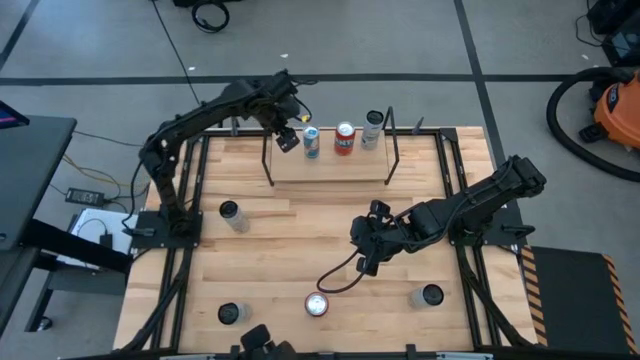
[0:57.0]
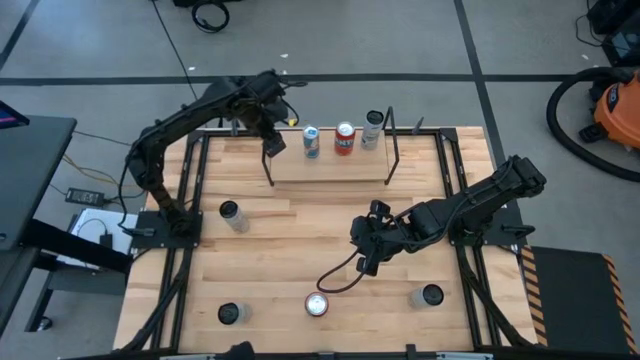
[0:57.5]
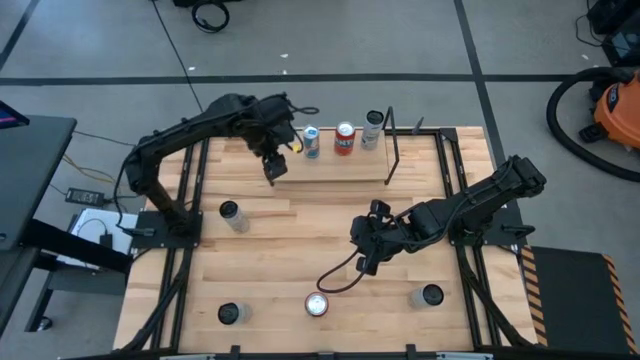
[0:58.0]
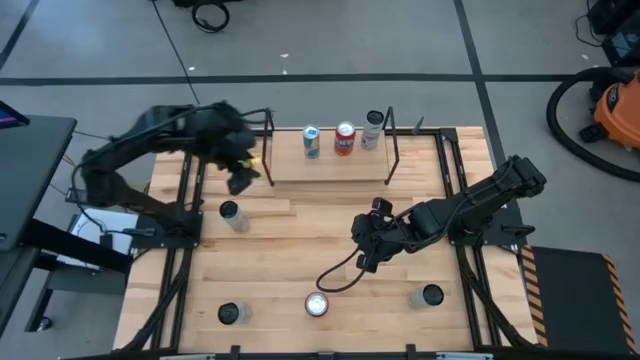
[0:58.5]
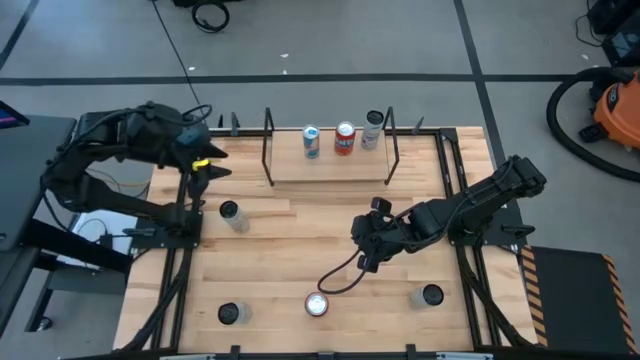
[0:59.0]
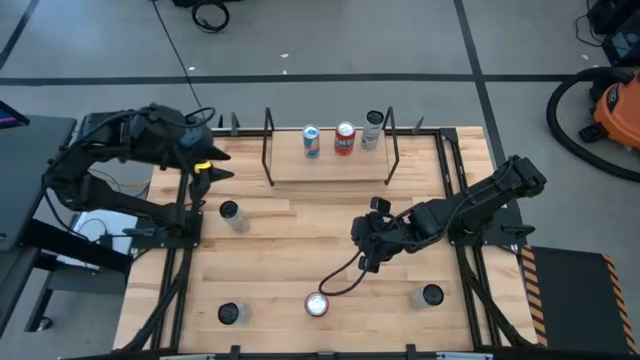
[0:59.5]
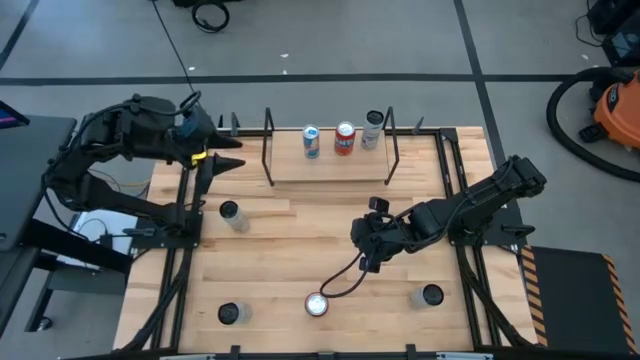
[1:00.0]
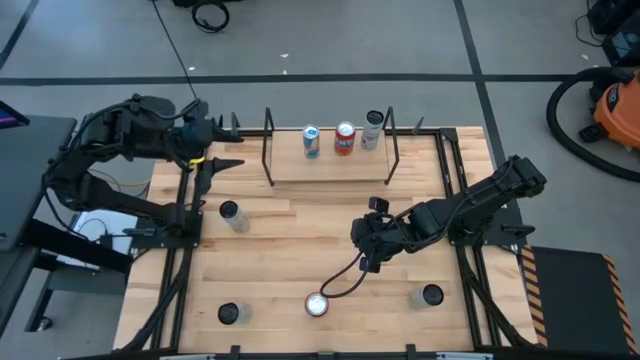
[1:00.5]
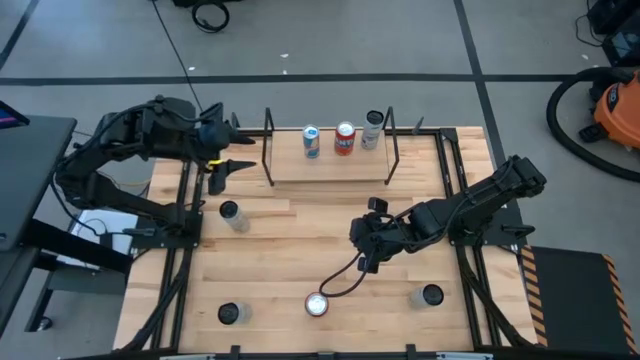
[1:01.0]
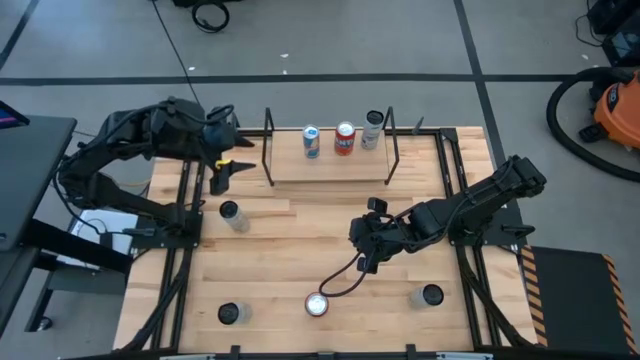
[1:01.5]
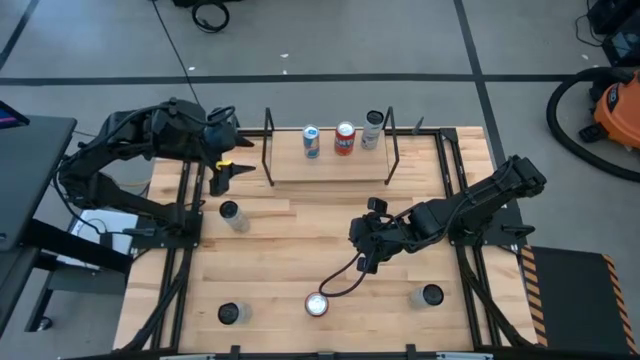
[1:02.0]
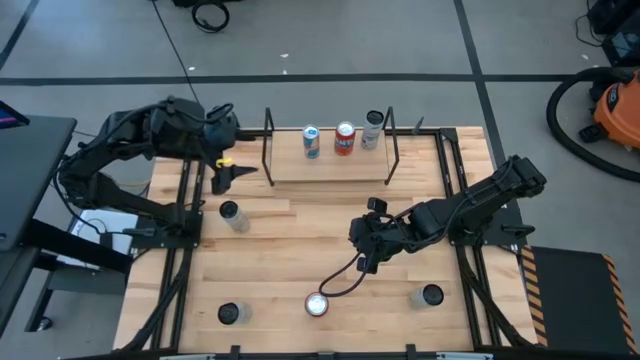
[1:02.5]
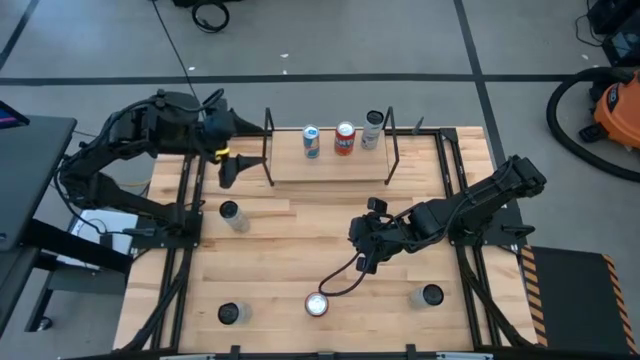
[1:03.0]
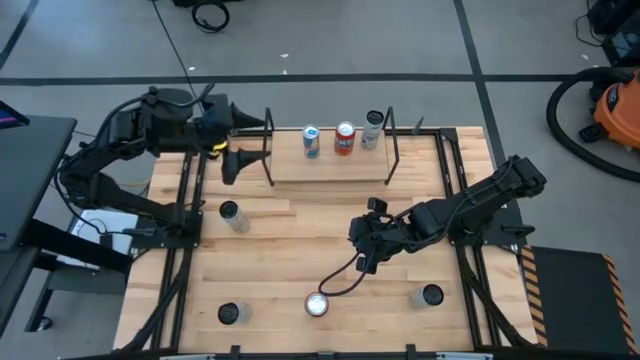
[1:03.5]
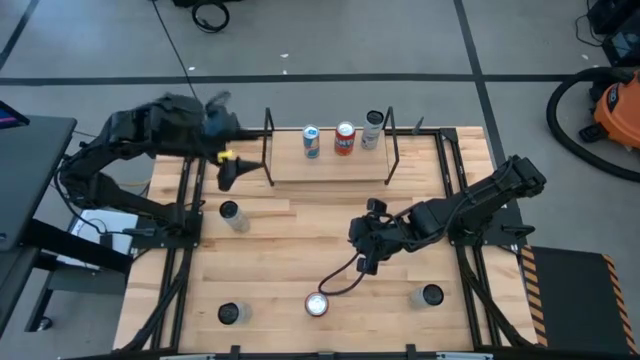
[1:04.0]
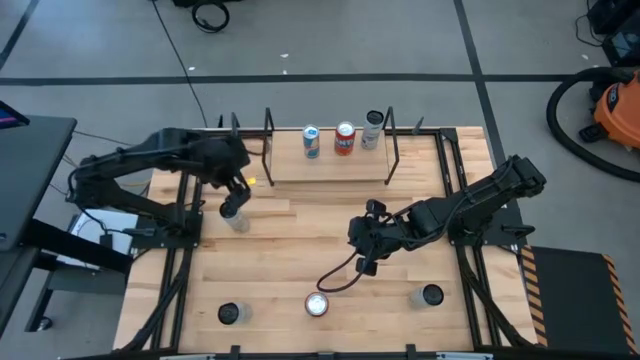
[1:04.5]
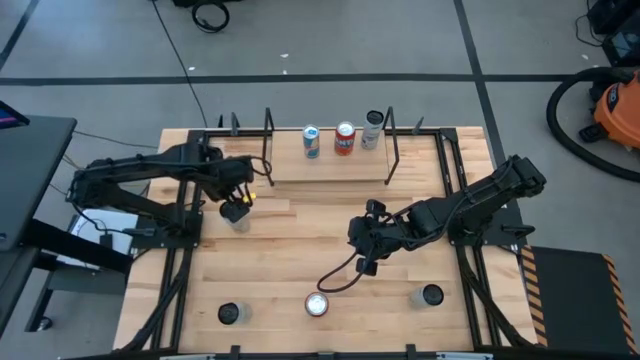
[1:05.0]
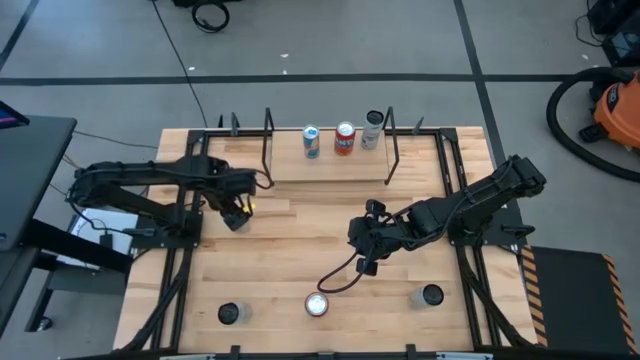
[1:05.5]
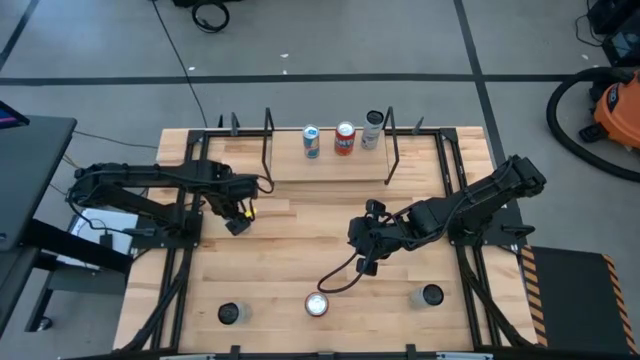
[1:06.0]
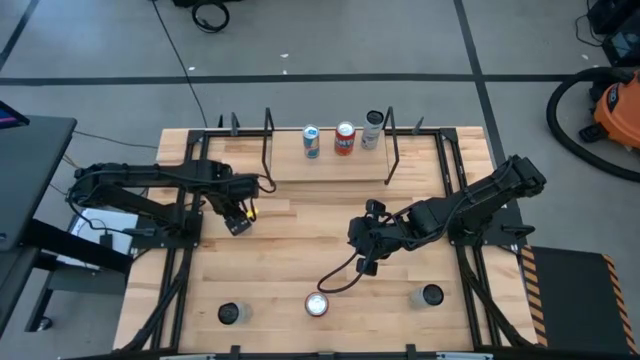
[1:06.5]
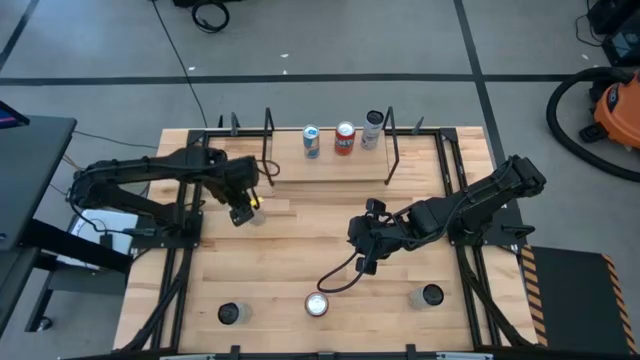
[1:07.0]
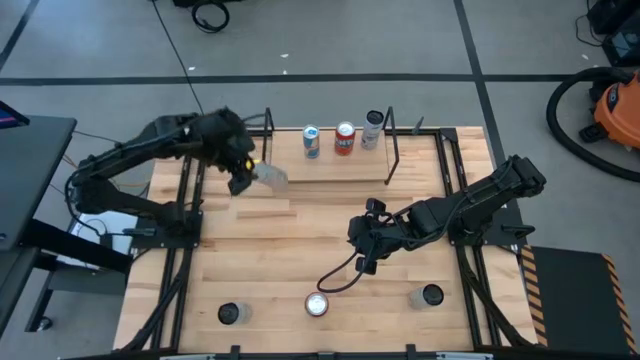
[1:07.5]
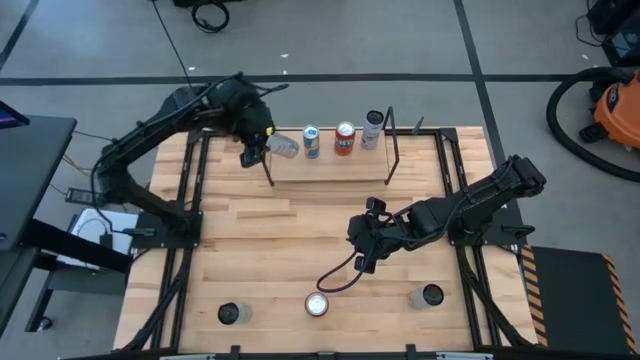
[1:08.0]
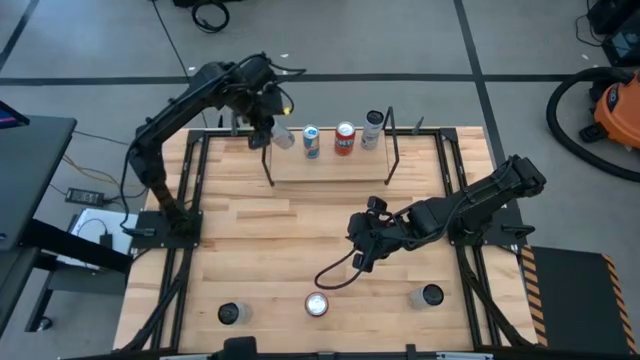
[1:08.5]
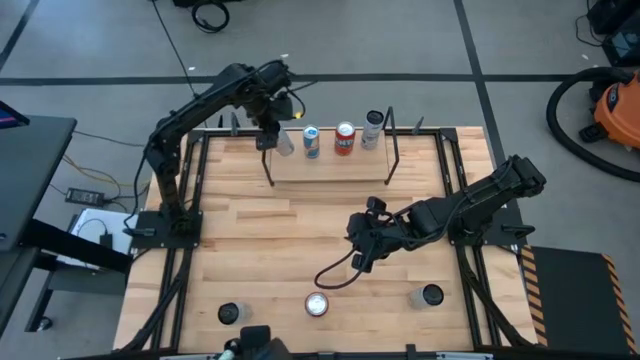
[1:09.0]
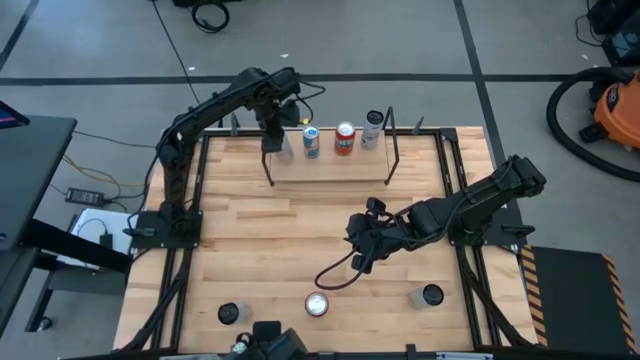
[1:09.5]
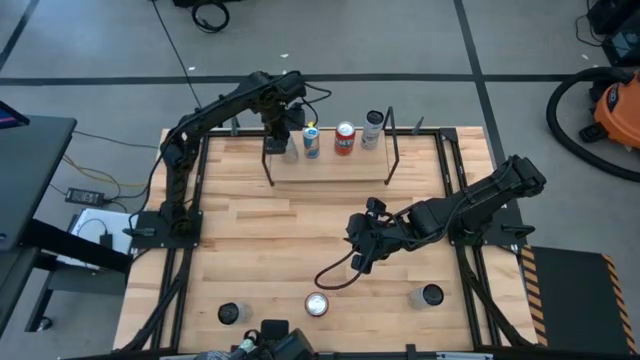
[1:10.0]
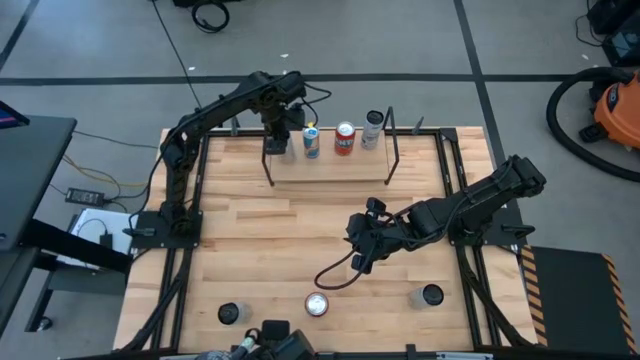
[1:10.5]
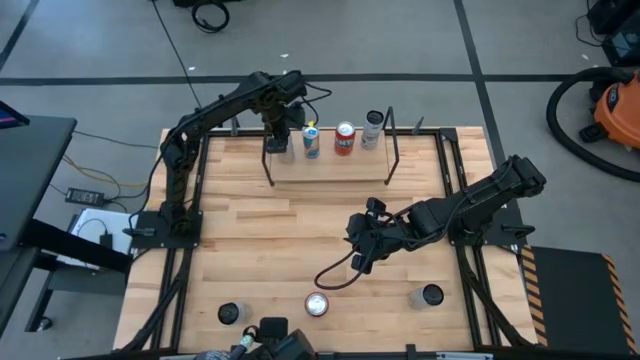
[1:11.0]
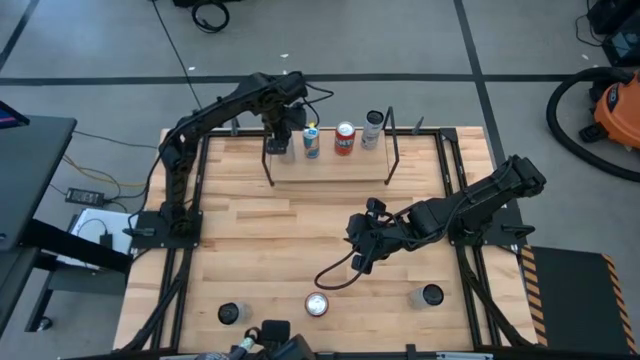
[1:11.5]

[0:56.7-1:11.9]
Task: Place canned beverage on shelf
Put the top white yellow soda can on the shelf

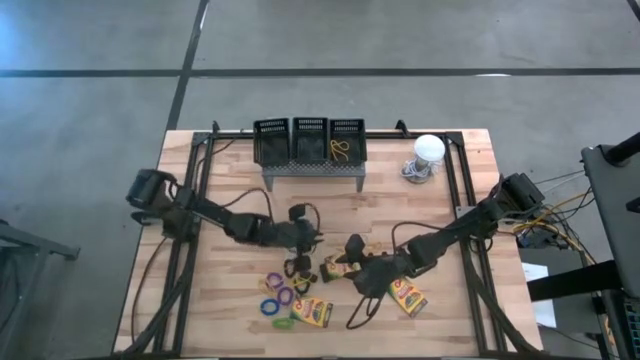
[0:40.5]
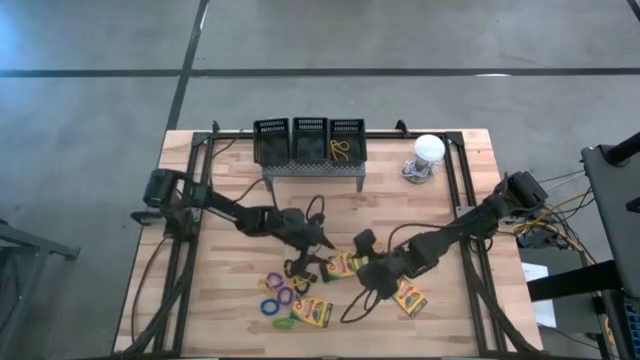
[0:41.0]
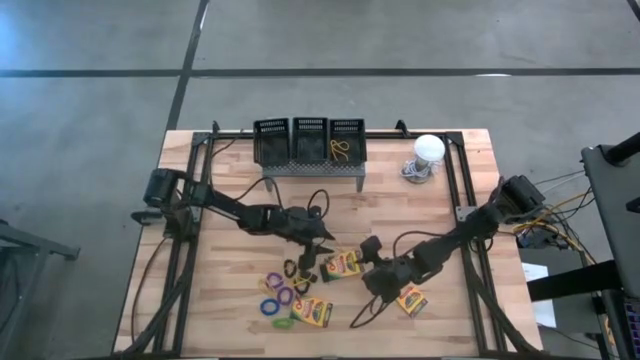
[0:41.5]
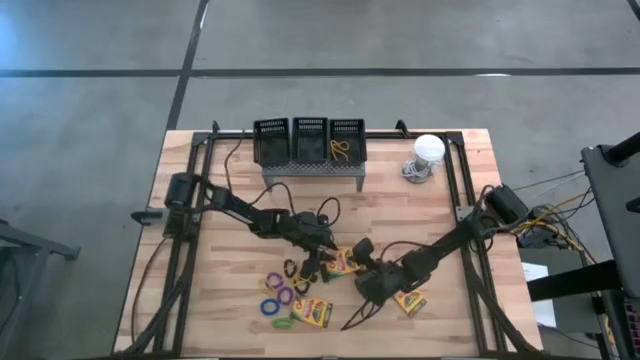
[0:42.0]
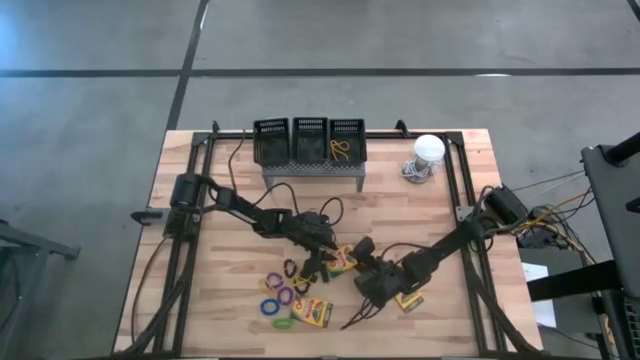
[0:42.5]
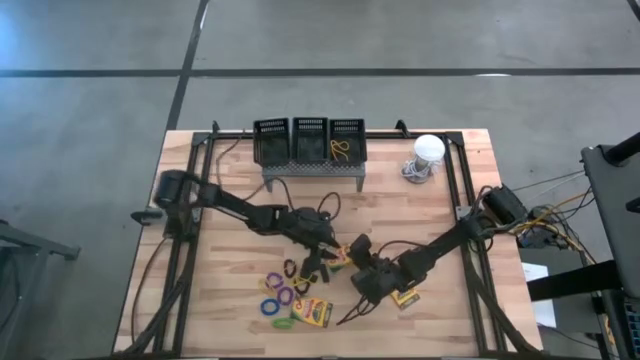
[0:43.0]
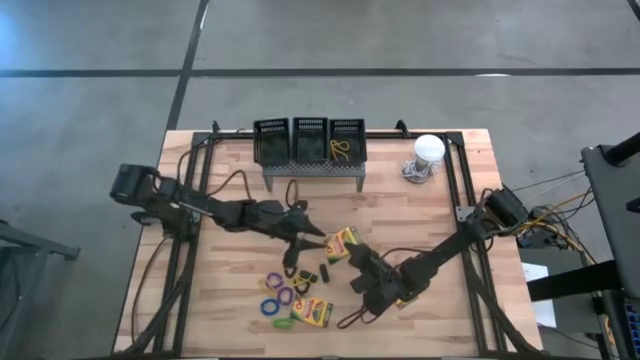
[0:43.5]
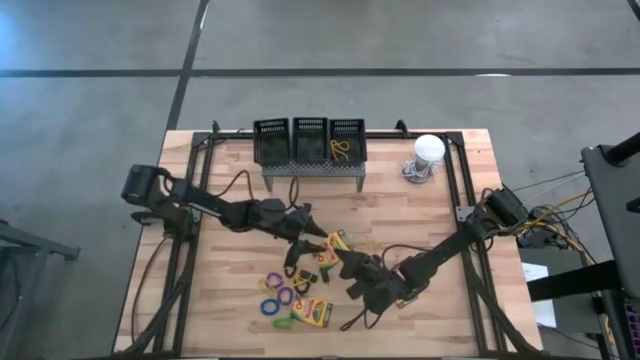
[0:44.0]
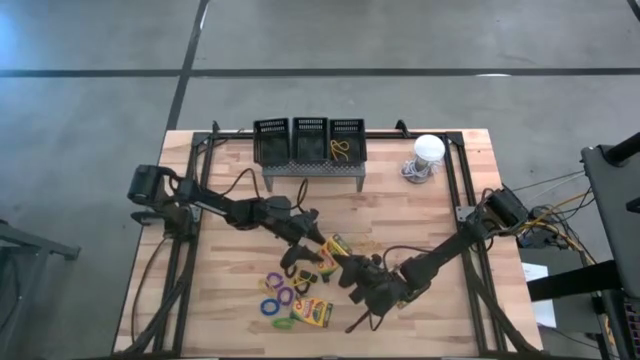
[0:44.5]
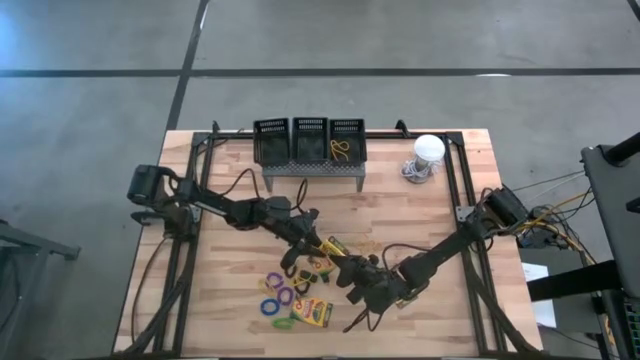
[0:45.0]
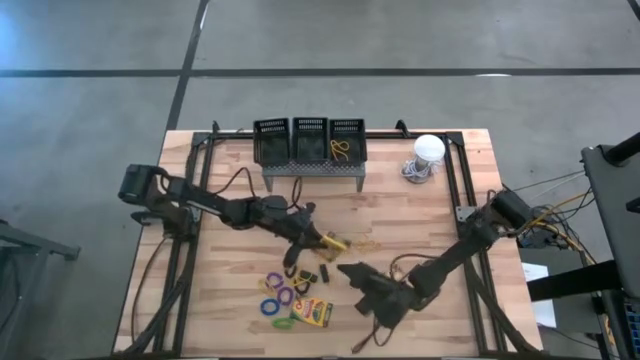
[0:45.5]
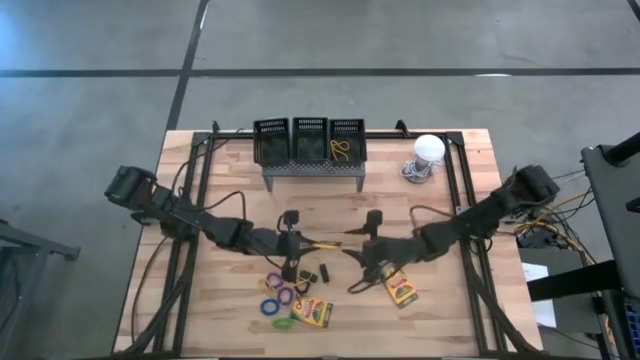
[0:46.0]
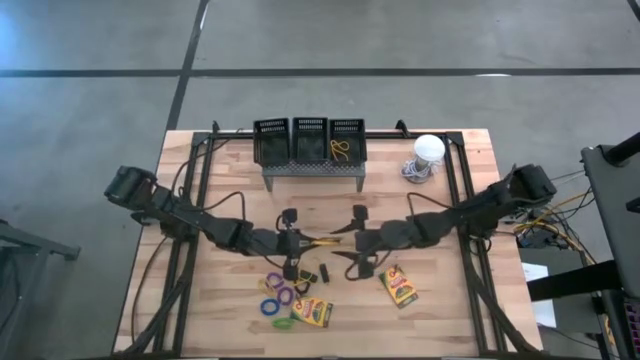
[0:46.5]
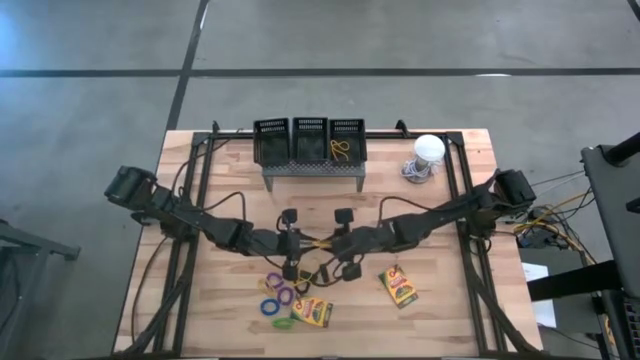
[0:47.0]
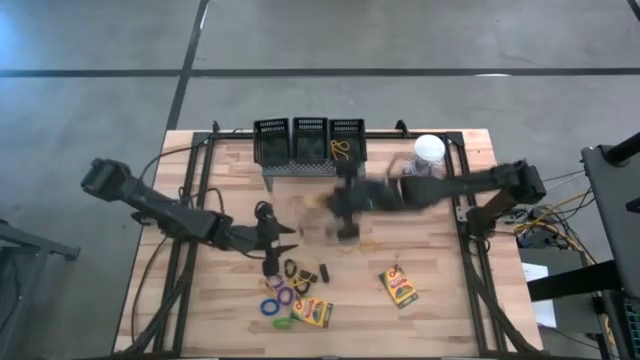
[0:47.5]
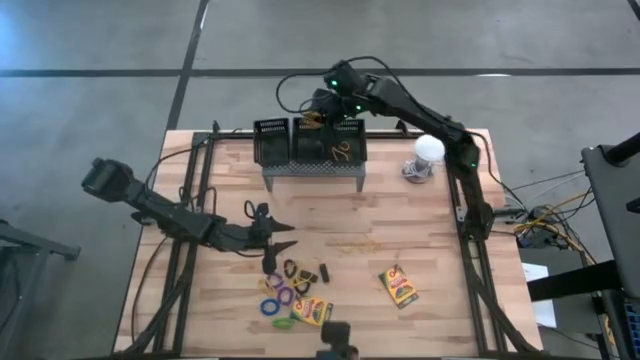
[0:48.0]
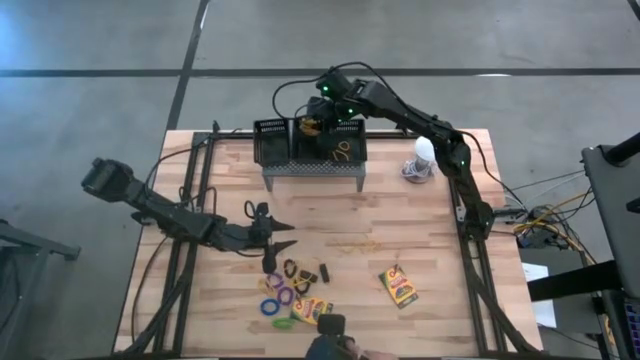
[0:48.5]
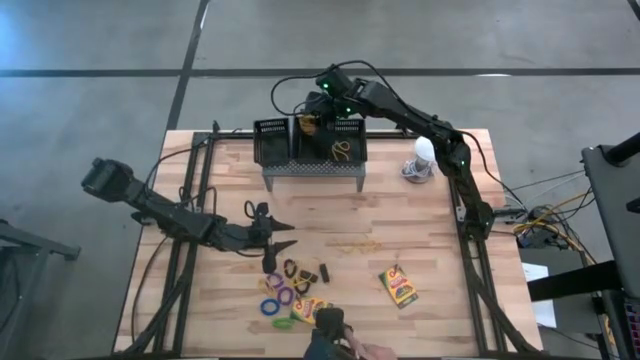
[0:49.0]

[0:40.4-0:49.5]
Task: Pick & Place Office Desk Supplies
Put the yellow crayon box into the middle black basket on the shelf
